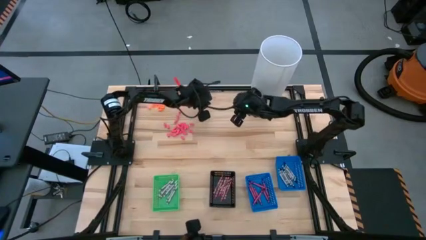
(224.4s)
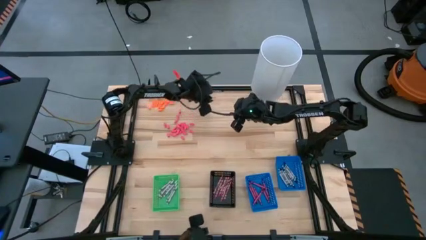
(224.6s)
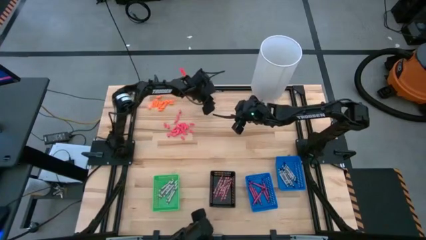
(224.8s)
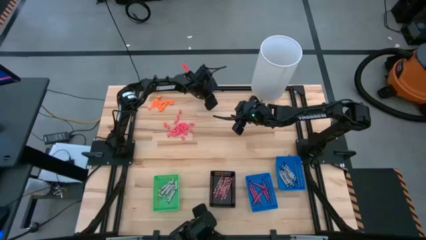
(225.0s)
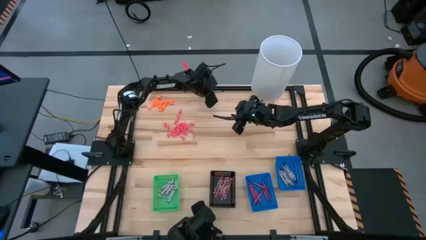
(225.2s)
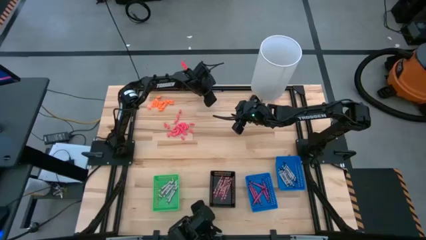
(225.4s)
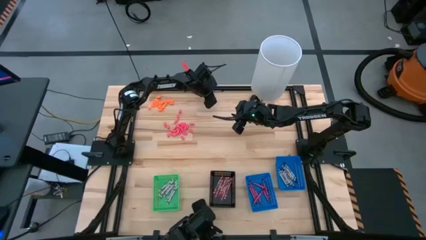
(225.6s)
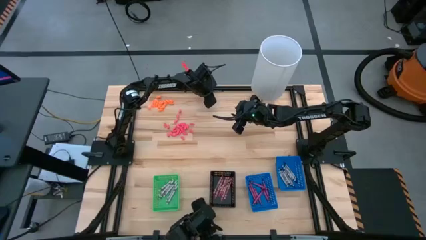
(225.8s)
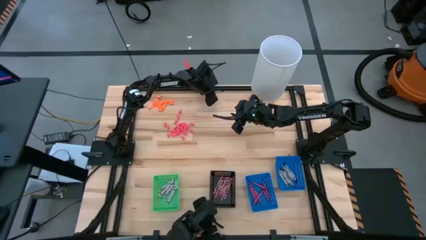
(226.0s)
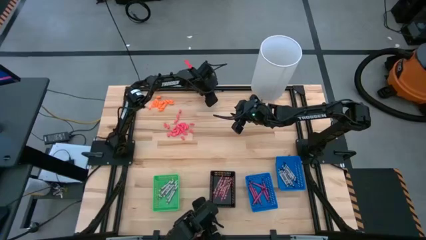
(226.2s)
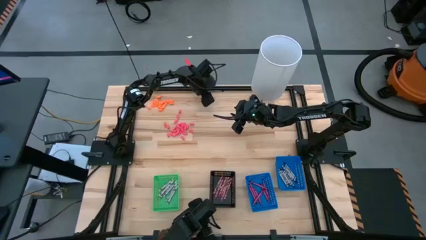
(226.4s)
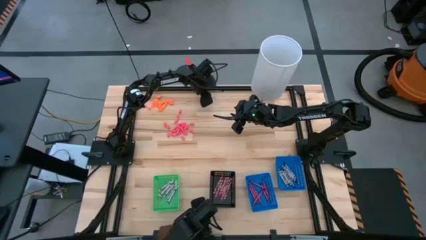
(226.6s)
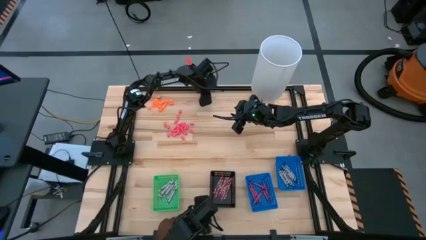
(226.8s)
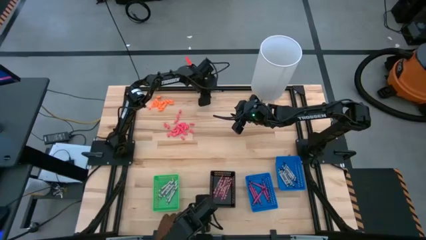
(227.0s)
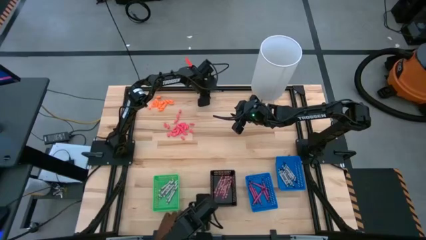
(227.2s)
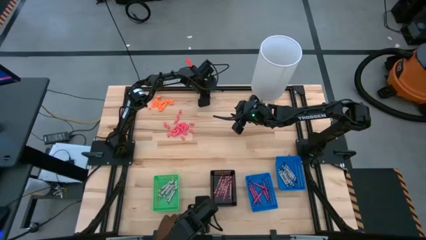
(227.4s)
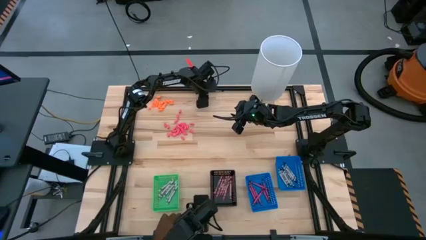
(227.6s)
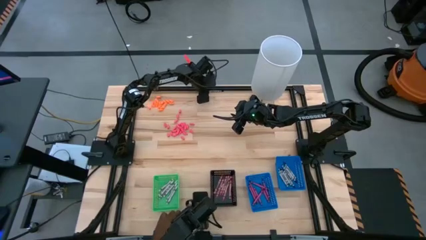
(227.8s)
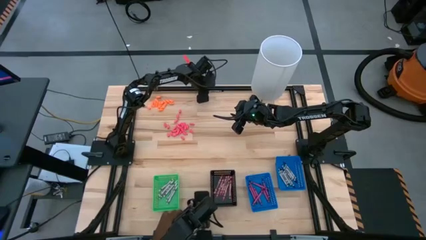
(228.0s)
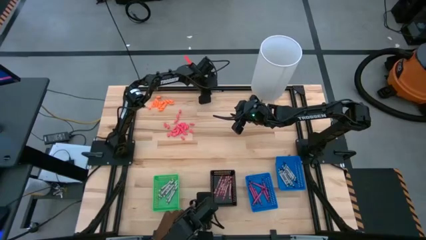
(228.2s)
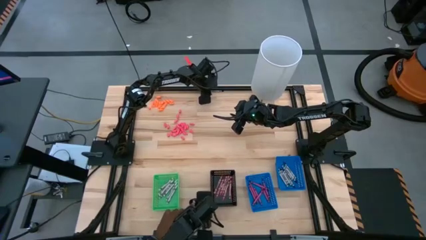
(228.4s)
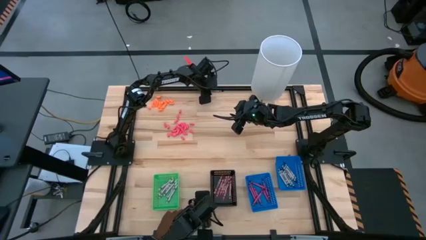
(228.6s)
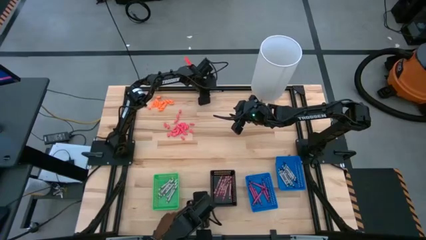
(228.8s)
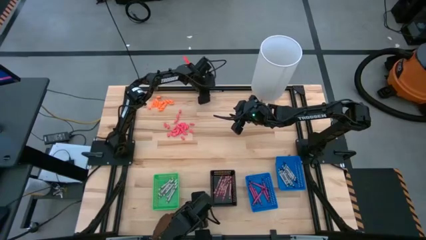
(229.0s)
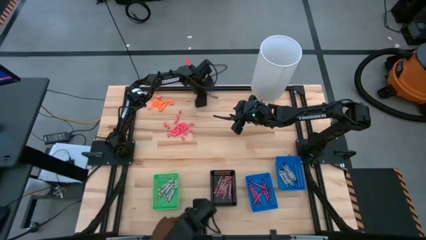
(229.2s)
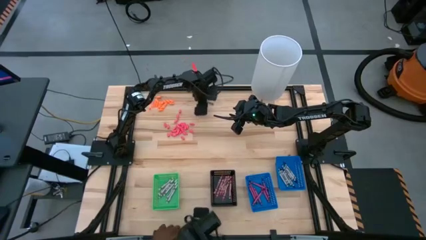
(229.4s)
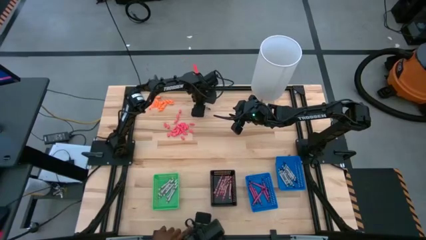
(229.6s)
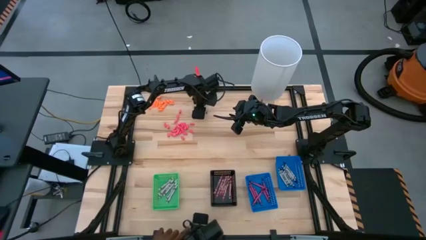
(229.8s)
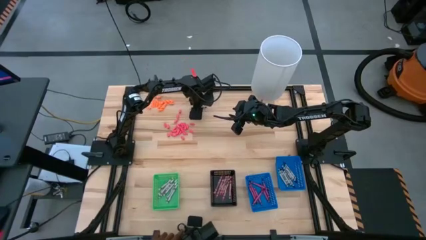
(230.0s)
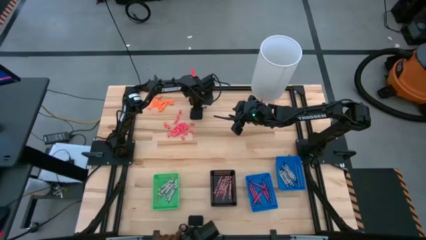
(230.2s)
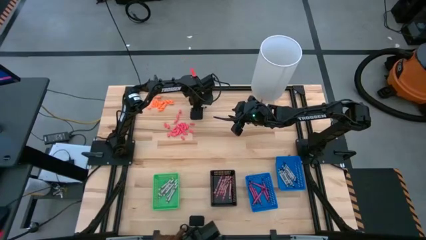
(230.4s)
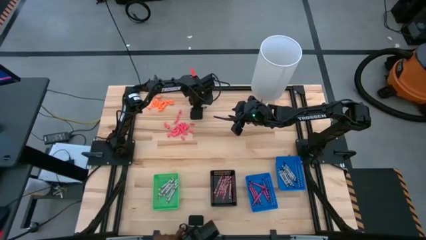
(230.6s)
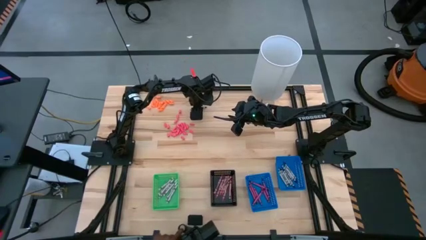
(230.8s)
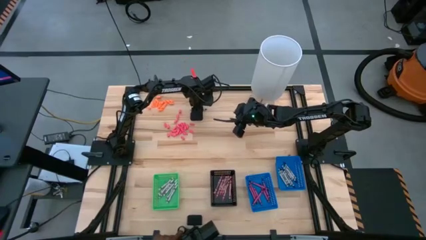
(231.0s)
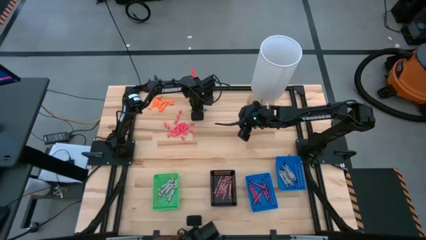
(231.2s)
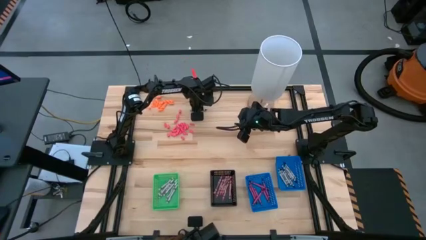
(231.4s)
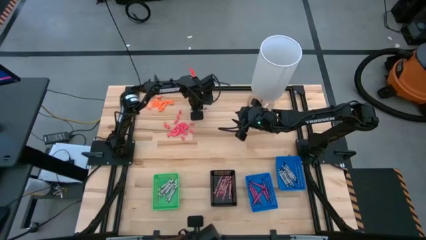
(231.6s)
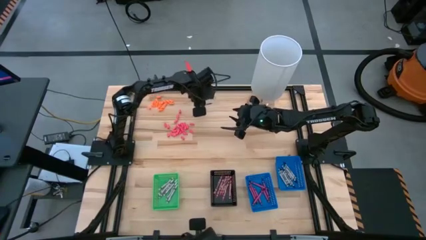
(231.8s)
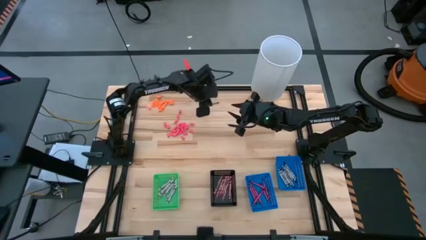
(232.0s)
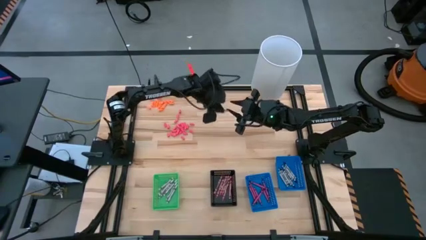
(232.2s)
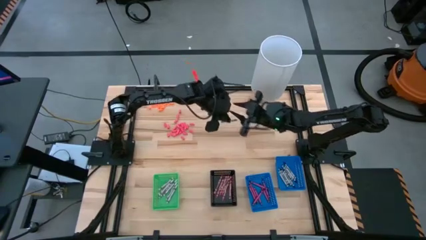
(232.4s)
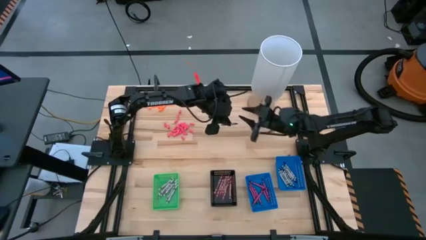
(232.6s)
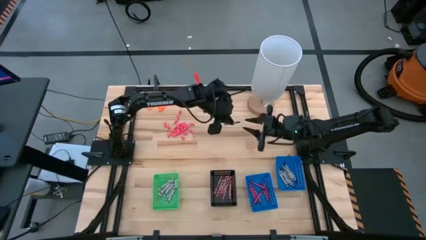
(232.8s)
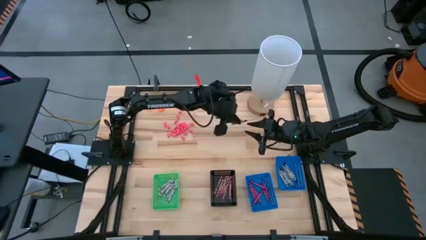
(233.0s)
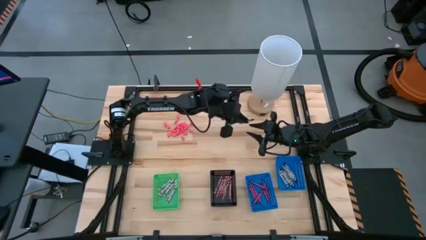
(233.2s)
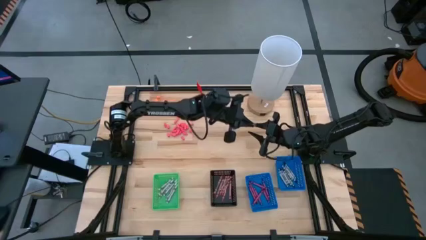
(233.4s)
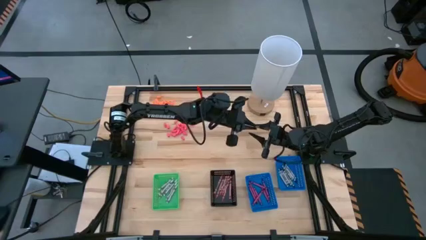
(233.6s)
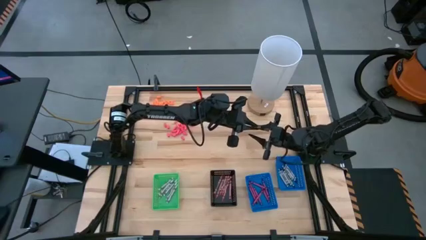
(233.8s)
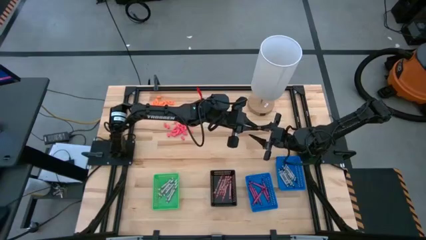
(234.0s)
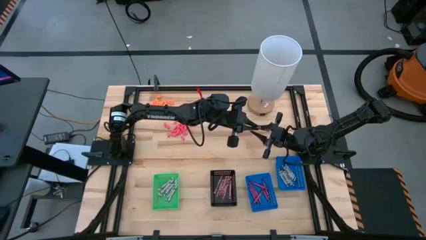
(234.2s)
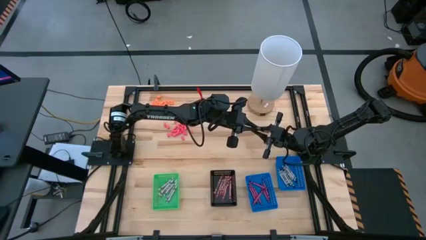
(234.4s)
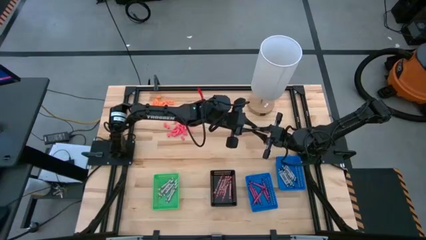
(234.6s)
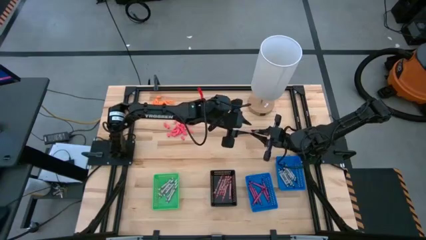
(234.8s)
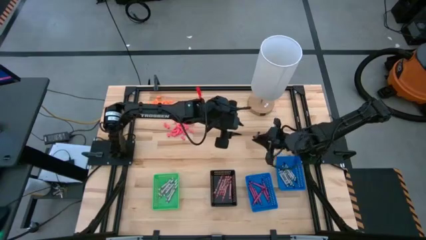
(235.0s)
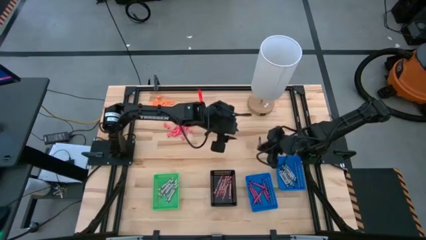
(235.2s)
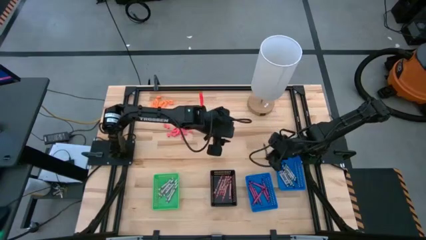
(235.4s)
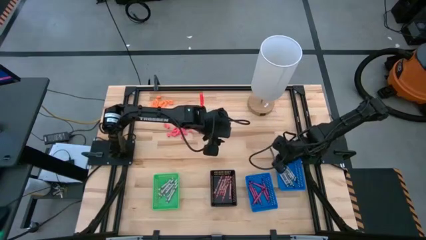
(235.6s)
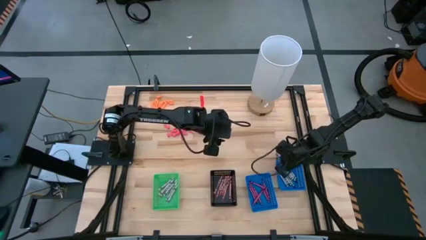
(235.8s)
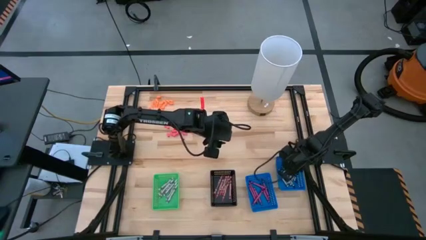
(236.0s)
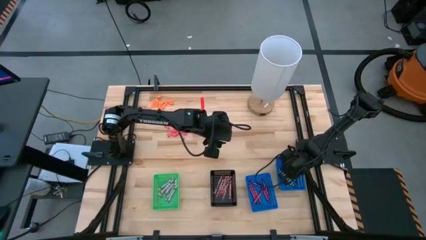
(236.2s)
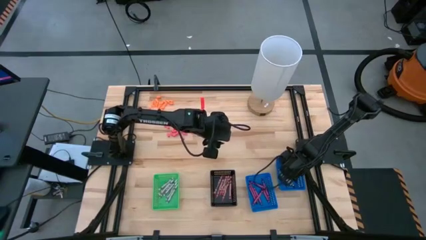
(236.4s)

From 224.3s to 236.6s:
Task: Sort crayons
Put the black crayon into the right blue bin

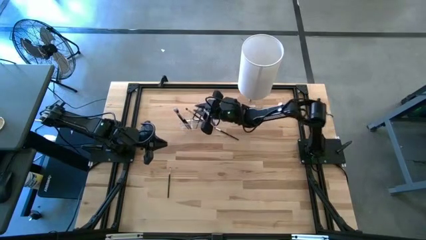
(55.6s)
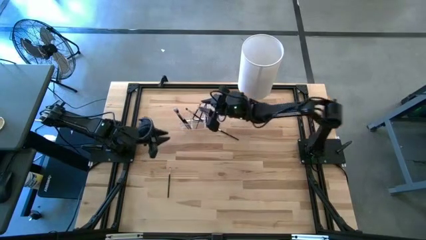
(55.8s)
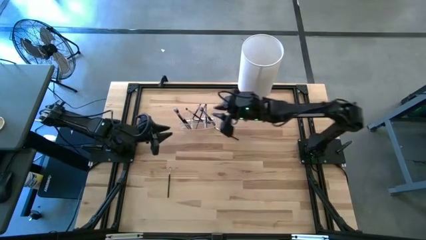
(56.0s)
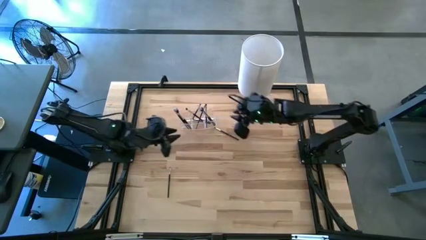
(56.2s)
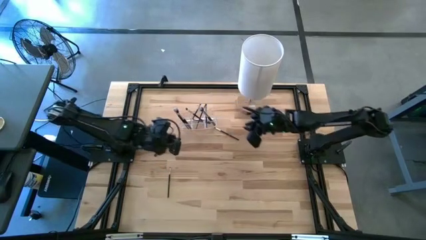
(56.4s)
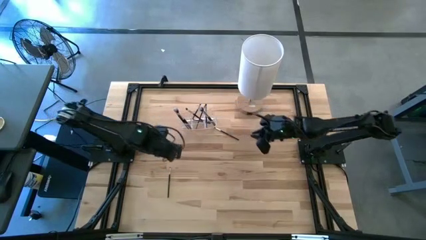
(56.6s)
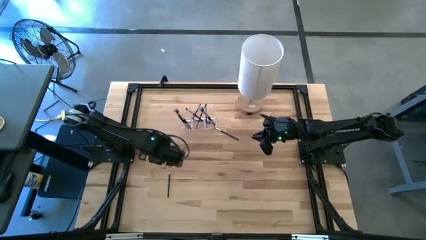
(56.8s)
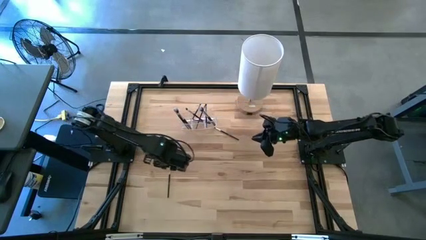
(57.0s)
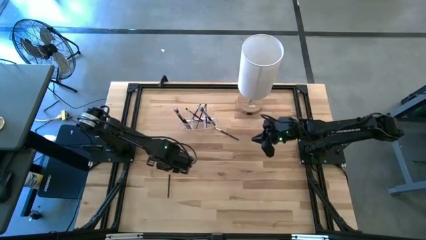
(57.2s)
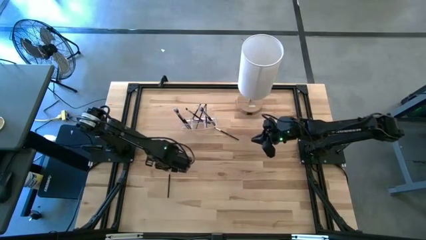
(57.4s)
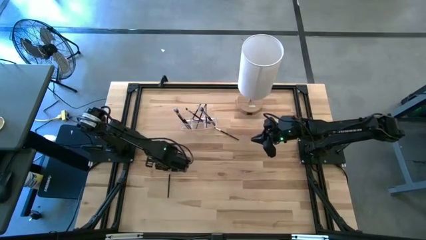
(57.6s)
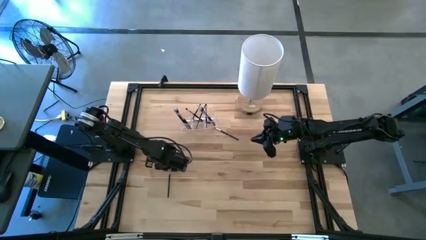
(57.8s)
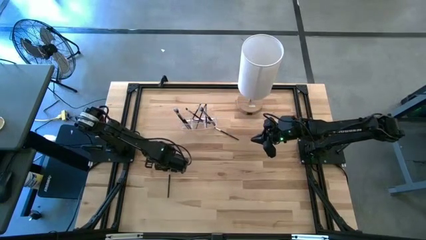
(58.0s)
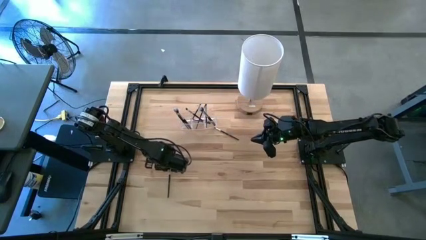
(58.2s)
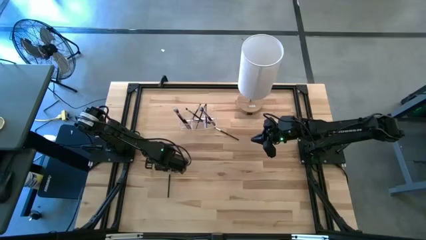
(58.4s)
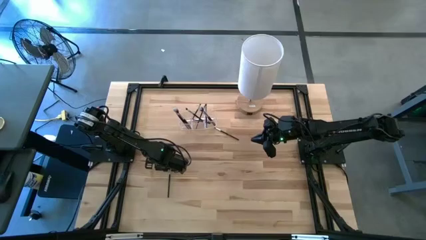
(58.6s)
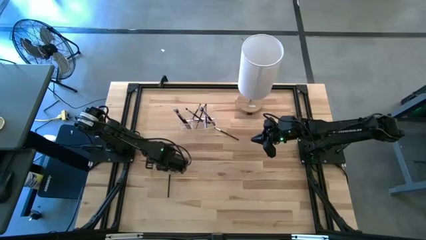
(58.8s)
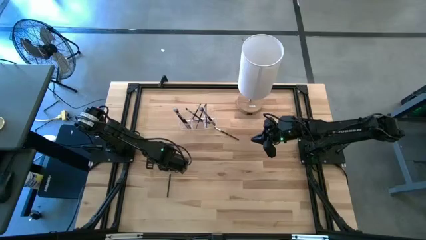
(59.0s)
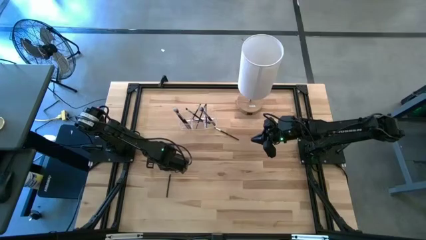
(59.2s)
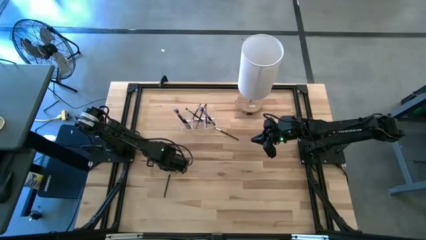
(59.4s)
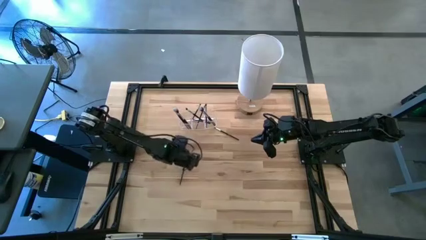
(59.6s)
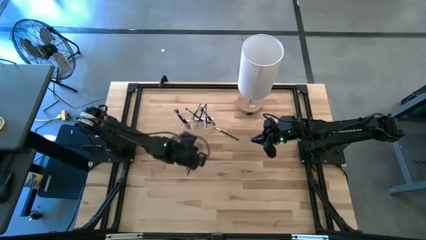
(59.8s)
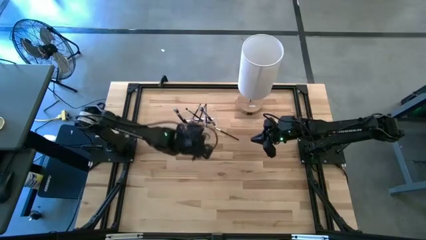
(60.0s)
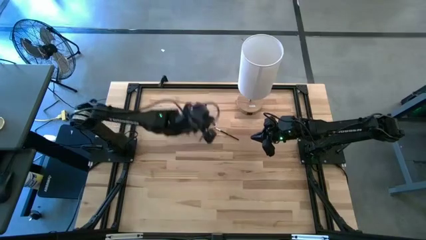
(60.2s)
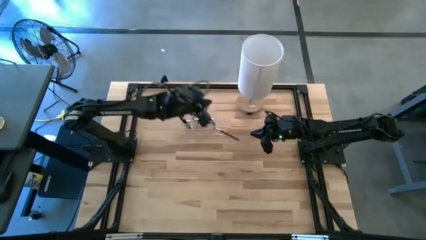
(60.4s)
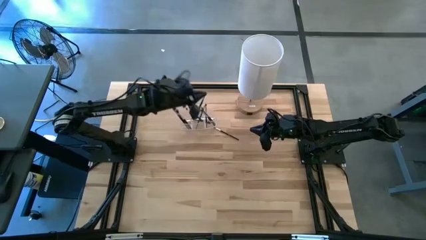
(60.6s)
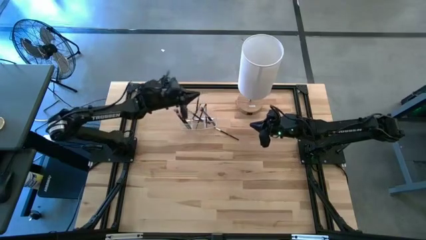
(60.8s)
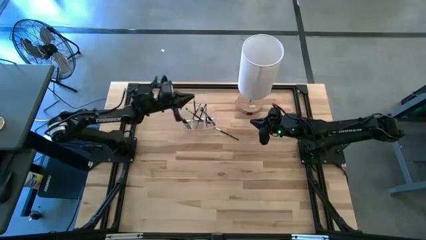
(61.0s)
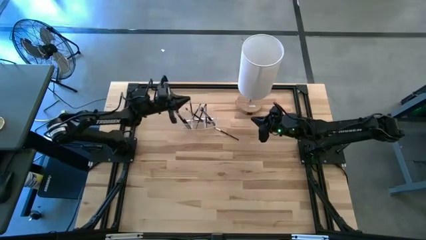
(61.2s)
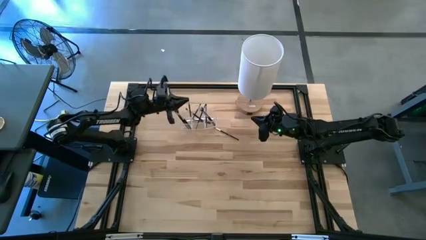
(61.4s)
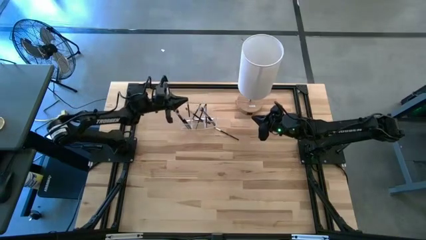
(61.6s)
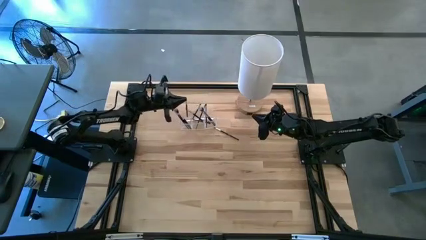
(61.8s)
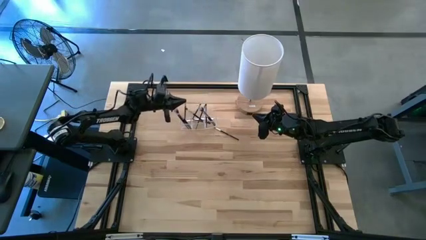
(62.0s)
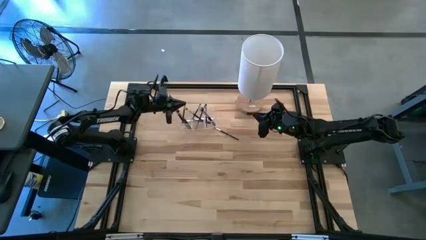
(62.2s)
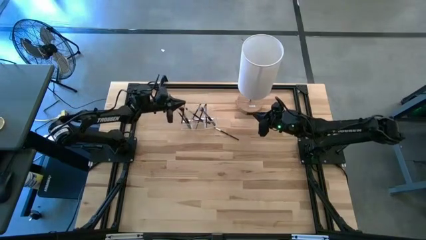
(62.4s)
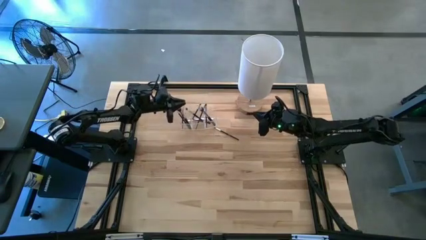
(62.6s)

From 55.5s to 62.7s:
Task: Put items in baskets/containers
Put the black eyeshadow brush into the transparent organizer
